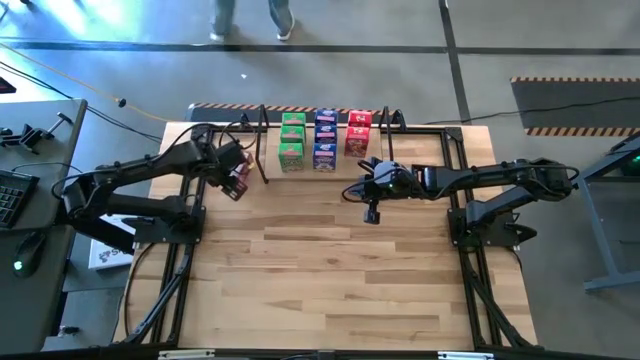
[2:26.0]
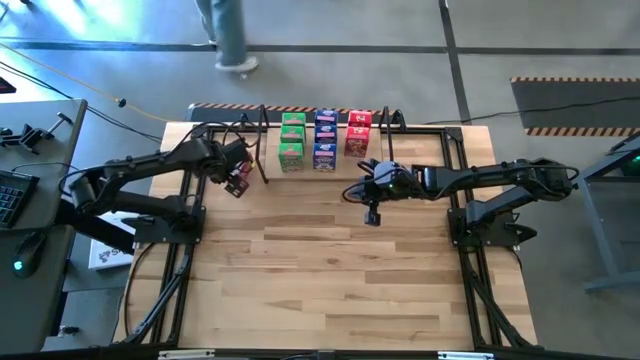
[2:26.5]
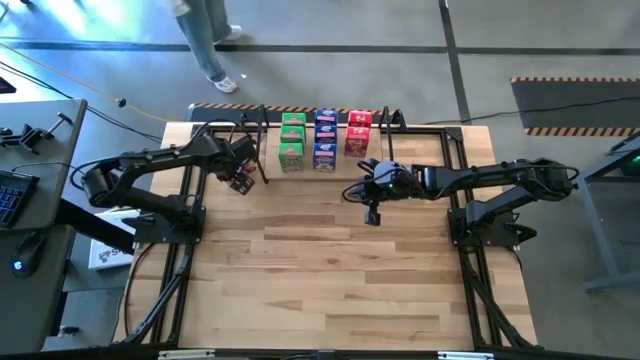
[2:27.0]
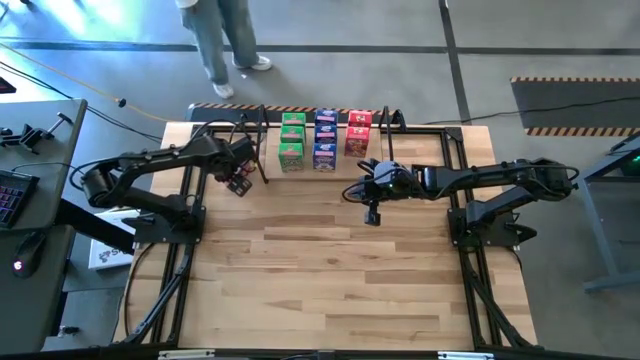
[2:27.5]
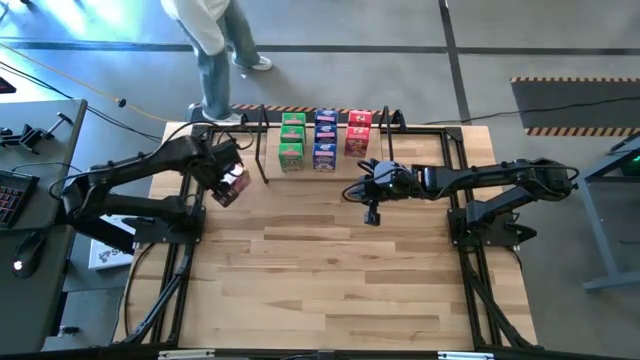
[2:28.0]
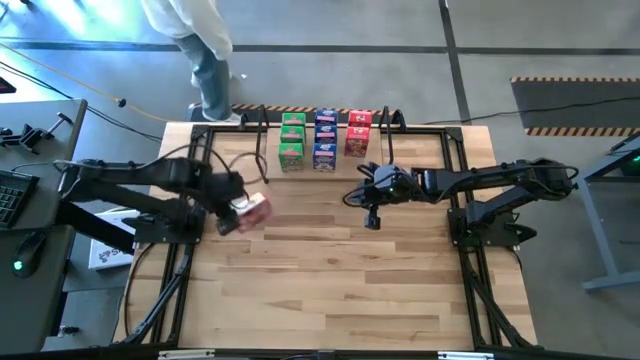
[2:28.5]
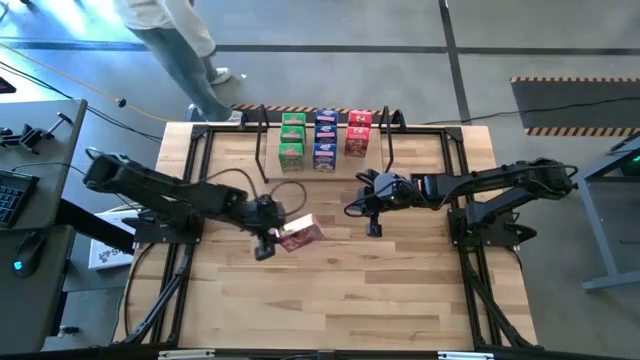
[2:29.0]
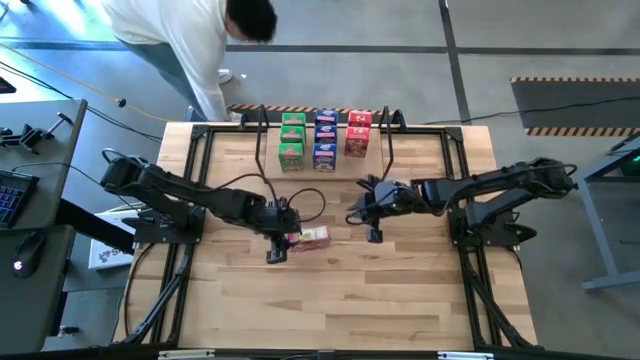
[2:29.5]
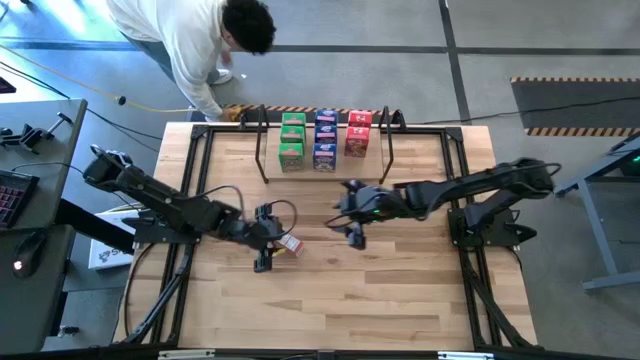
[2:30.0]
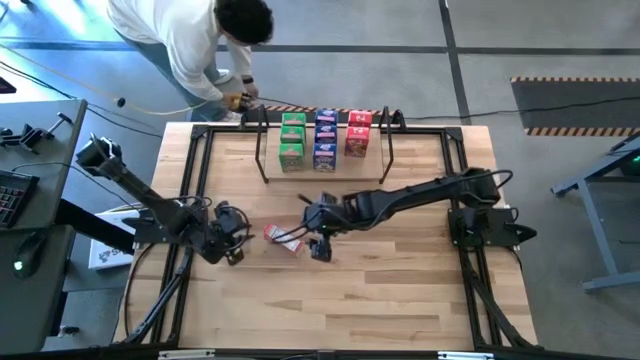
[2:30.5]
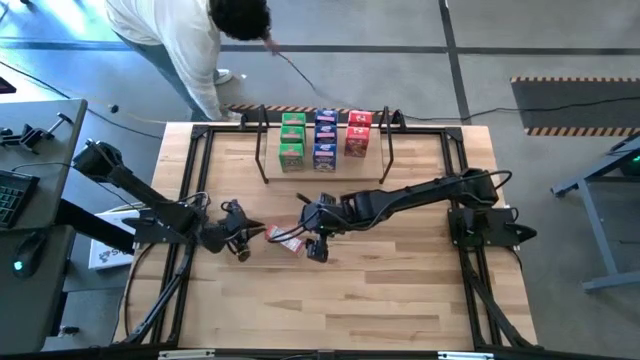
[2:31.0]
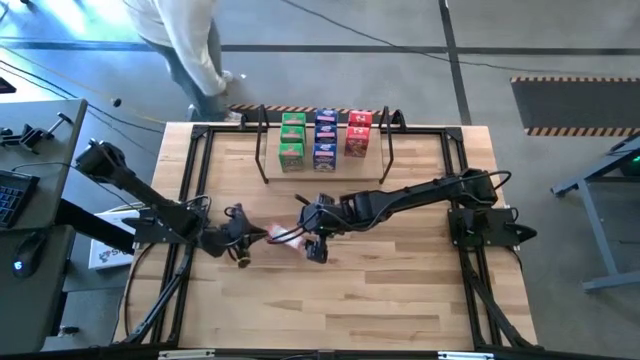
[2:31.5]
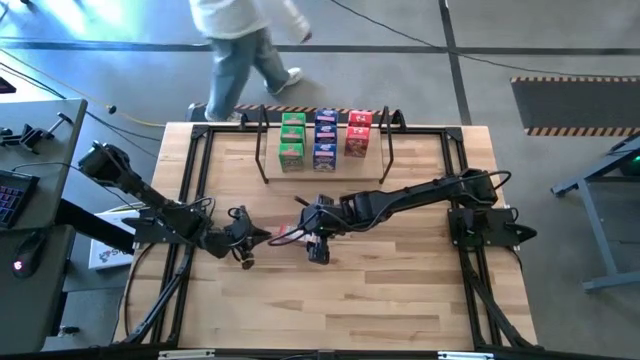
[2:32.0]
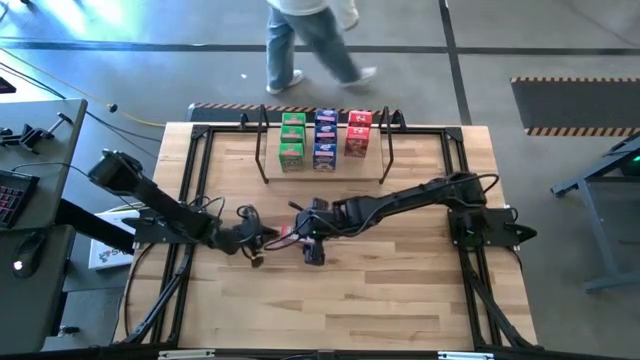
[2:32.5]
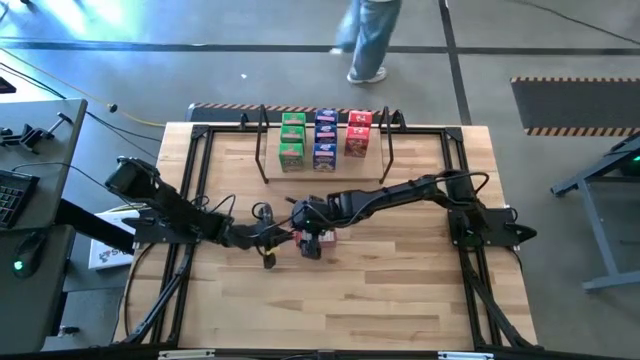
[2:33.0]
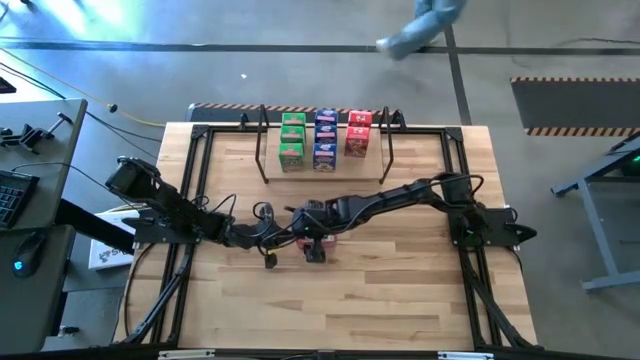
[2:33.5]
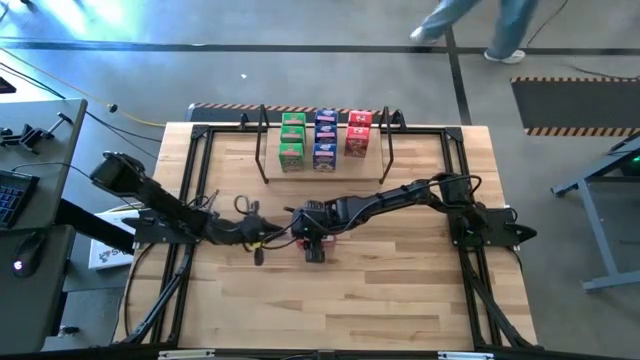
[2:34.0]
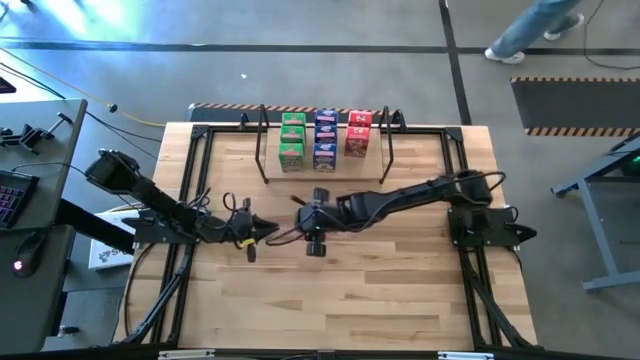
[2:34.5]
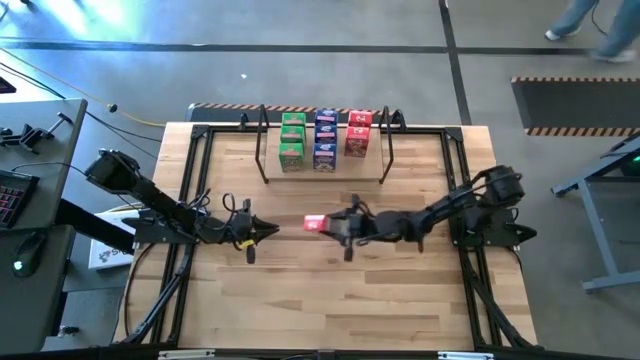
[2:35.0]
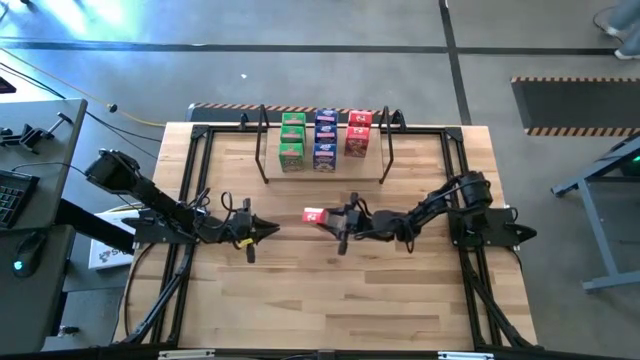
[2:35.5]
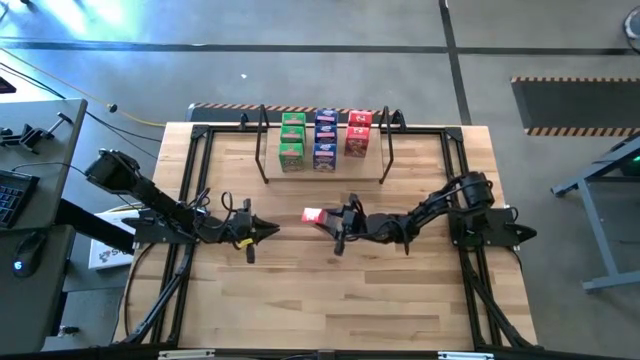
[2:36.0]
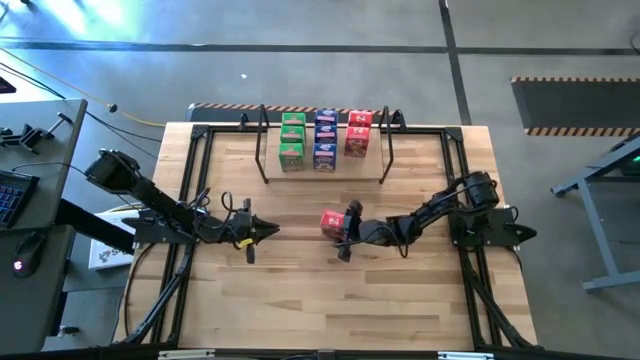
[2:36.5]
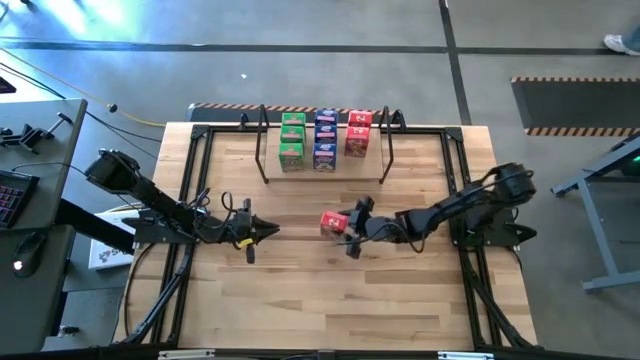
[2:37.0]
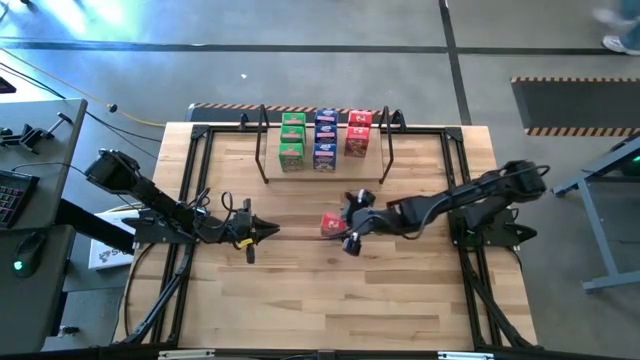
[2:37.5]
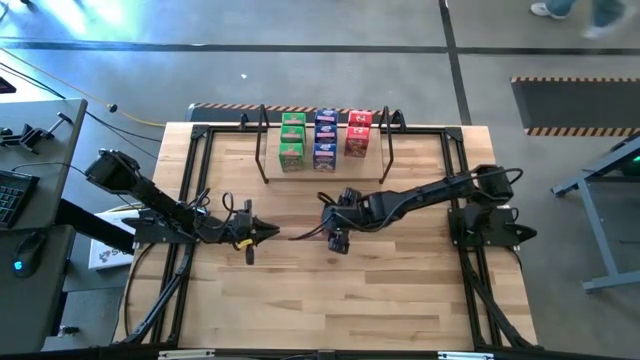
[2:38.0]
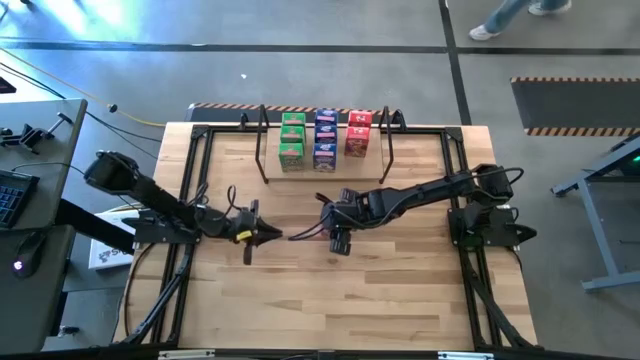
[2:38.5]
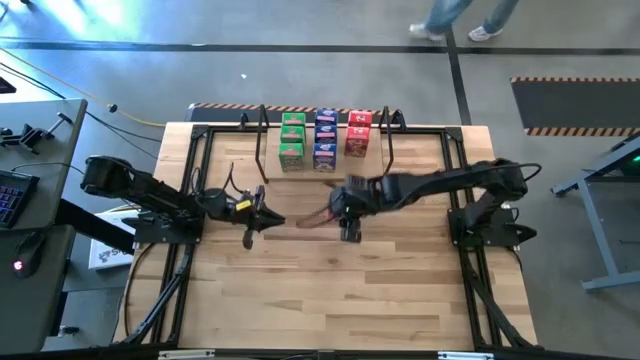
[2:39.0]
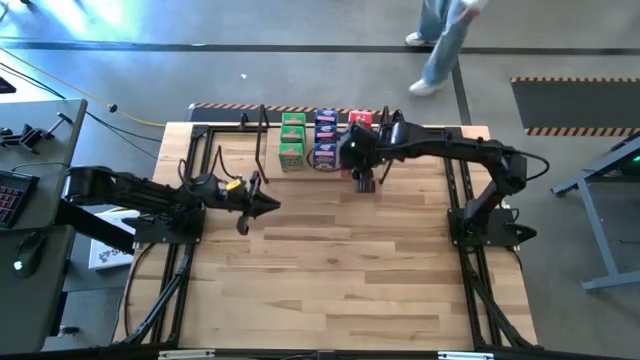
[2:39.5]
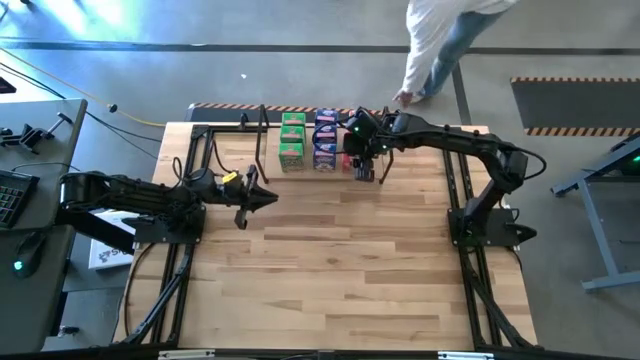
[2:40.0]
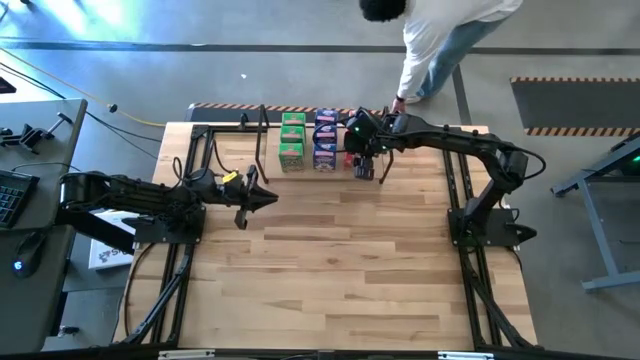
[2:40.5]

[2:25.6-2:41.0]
Task: Stack cereal on shelf
Put the red cereal box on the shelf aligned with the red cereal box

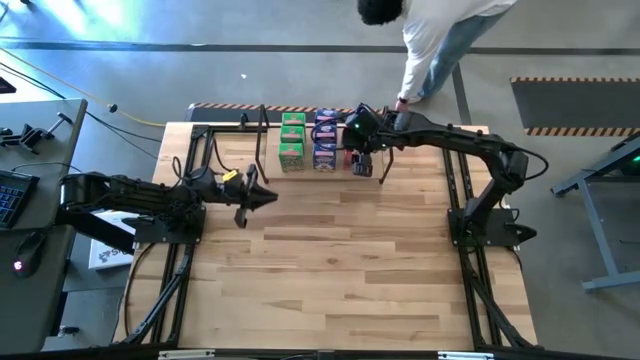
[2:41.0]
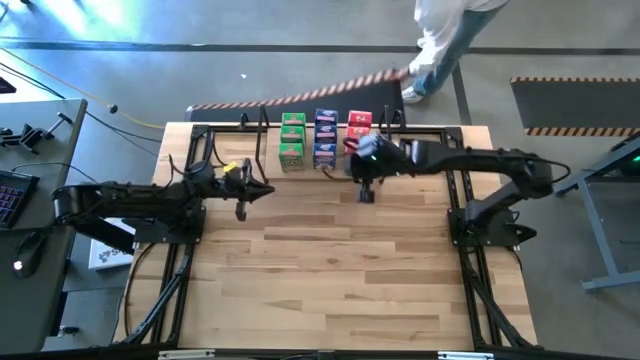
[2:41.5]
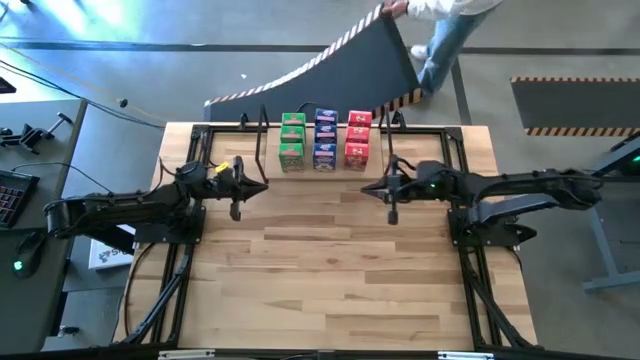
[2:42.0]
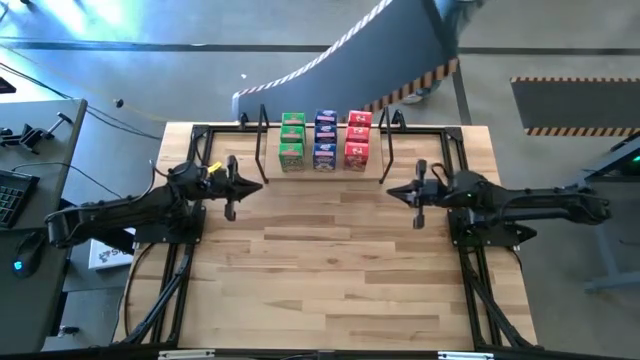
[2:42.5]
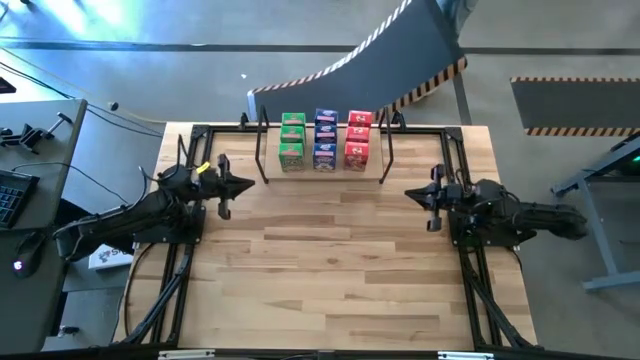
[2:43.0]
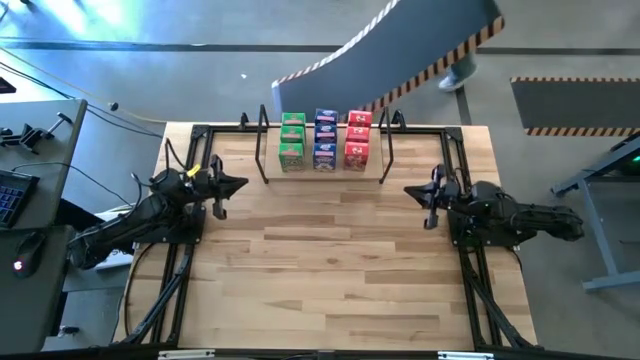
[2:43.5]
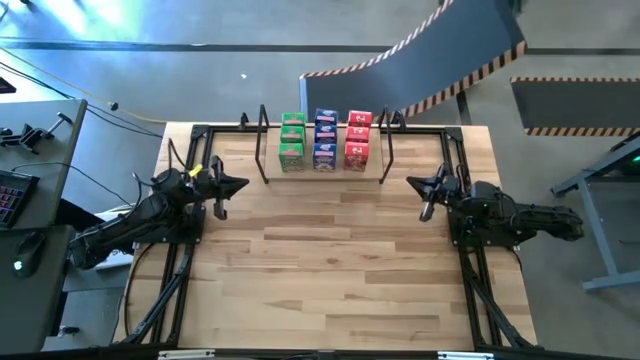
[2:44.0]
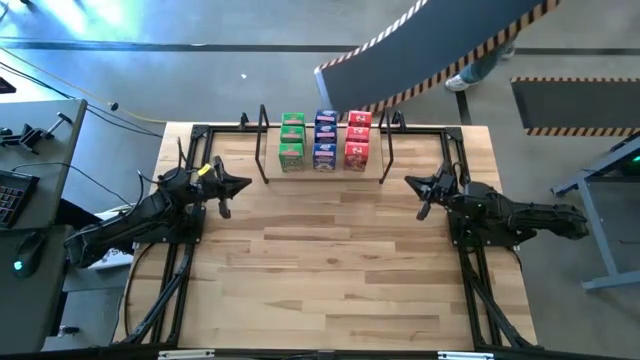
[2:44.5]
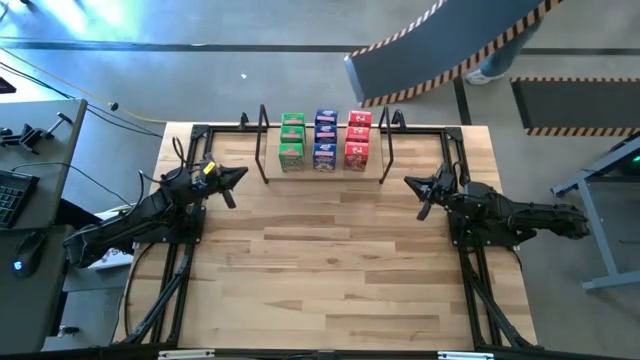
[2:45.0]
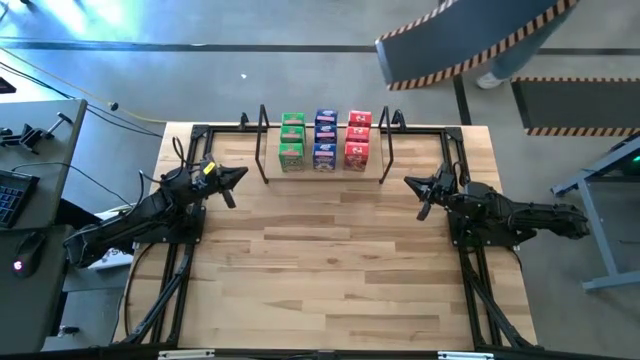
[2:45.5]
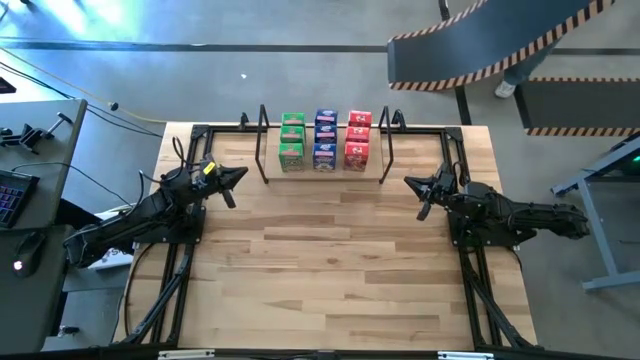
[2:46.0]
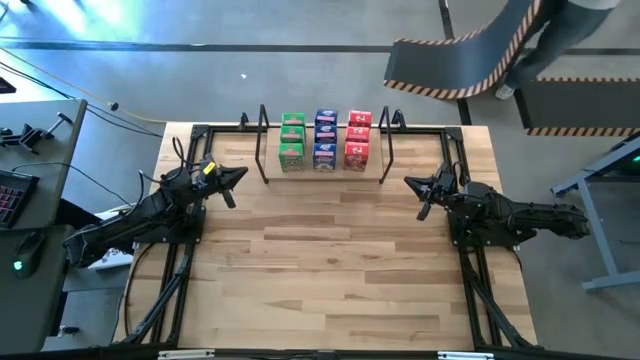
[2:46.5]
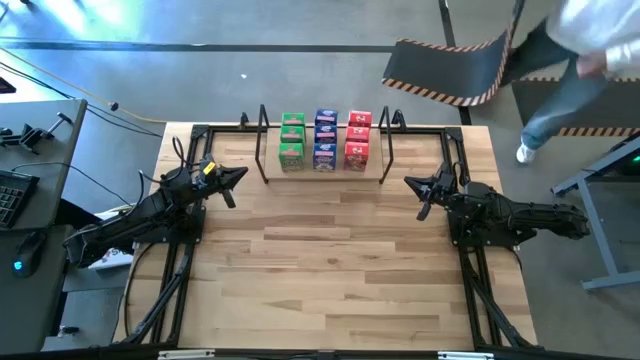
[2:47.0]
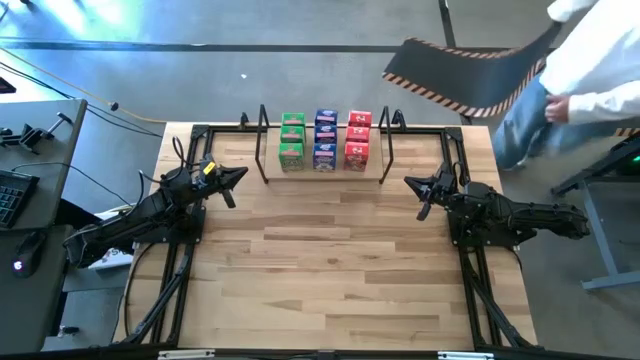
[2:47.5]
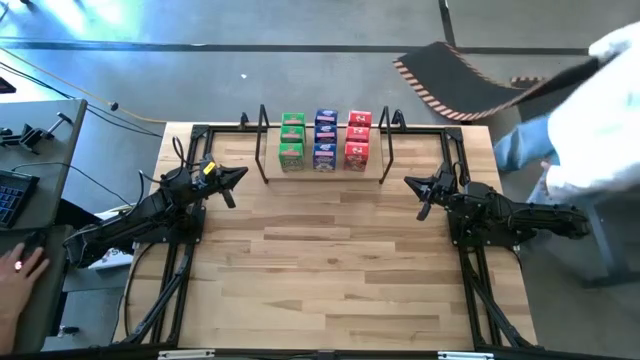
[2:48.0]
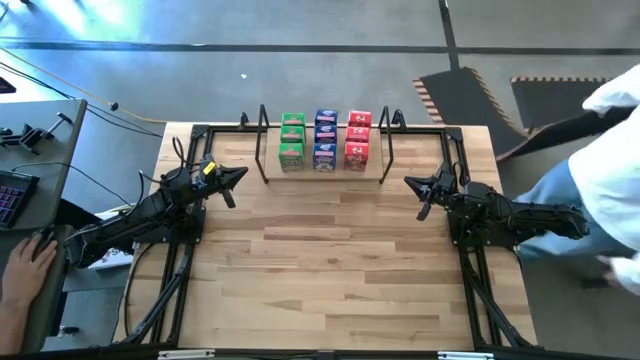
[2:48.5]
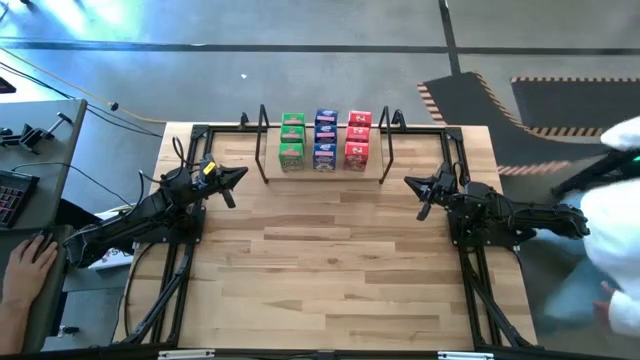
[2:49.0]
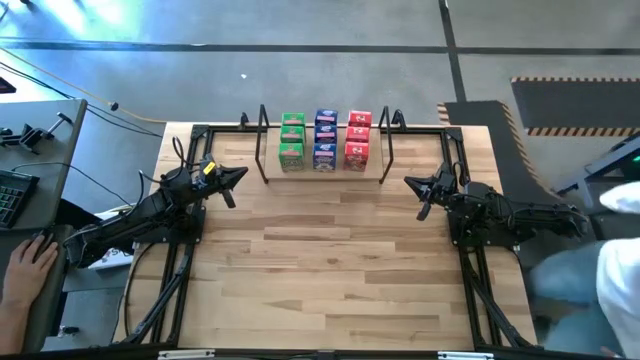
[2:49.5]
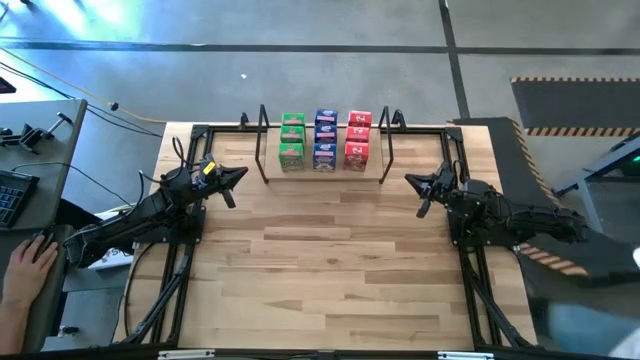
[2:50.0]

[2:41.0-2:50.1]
Return to Home Position
